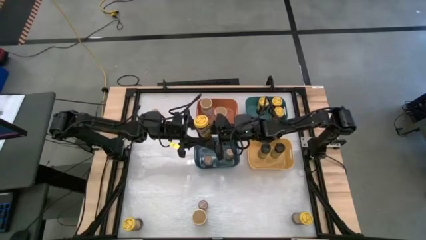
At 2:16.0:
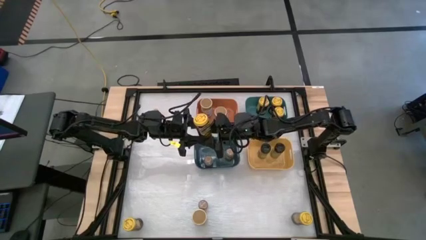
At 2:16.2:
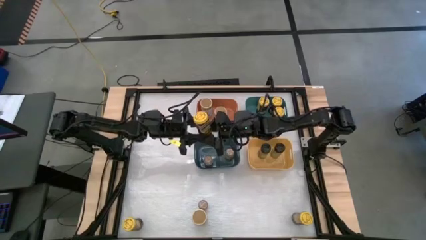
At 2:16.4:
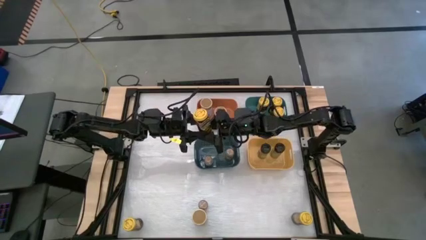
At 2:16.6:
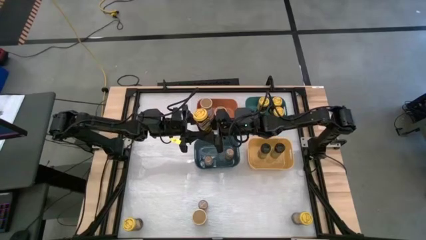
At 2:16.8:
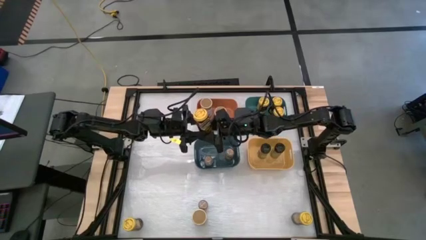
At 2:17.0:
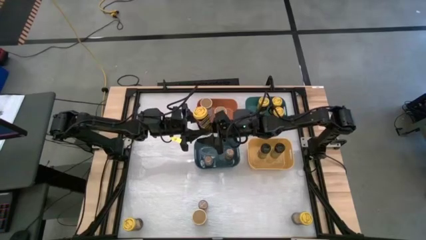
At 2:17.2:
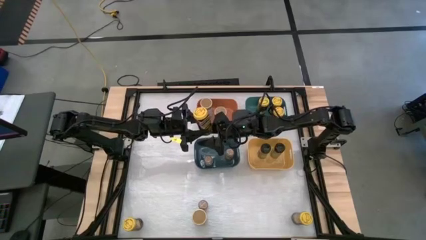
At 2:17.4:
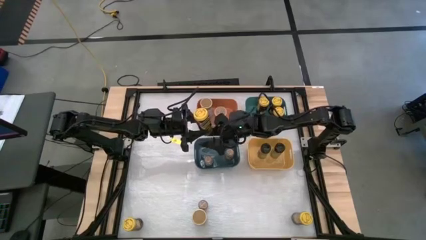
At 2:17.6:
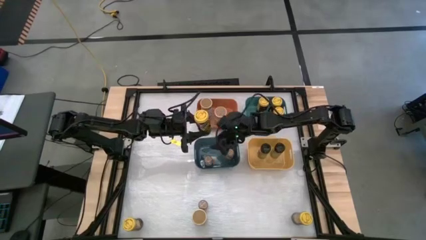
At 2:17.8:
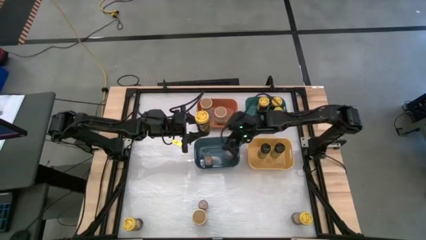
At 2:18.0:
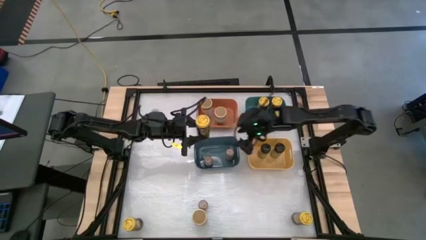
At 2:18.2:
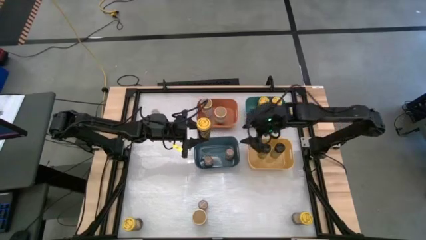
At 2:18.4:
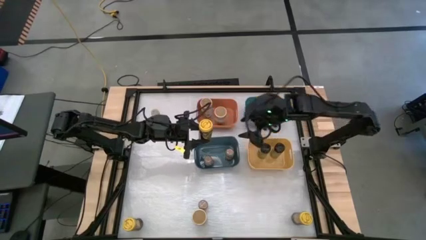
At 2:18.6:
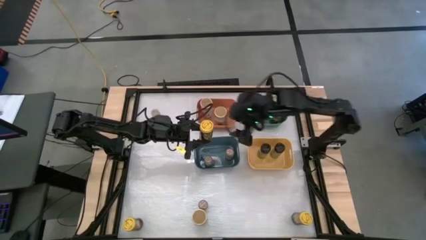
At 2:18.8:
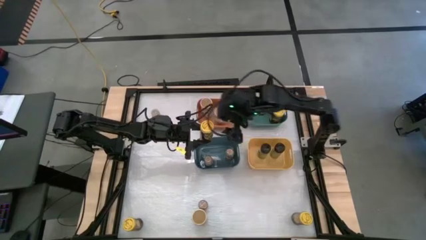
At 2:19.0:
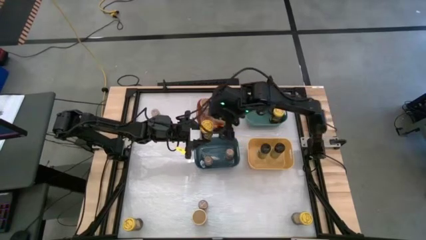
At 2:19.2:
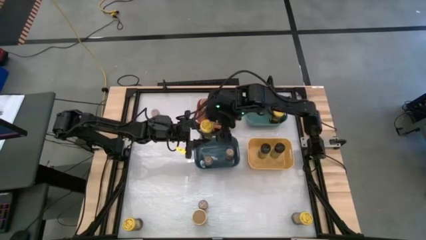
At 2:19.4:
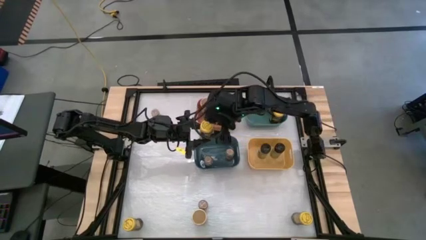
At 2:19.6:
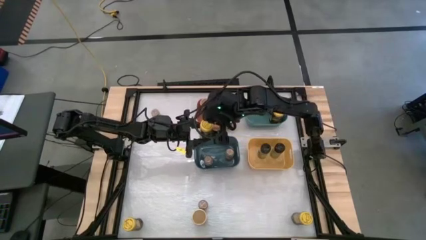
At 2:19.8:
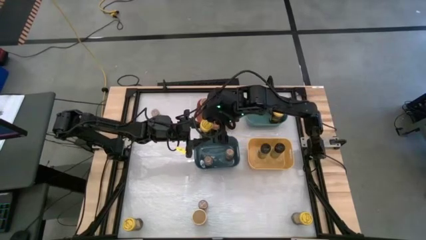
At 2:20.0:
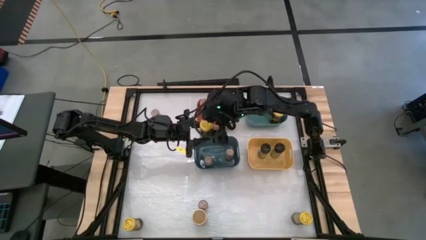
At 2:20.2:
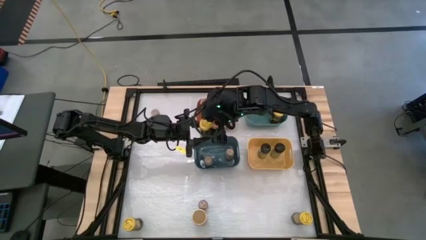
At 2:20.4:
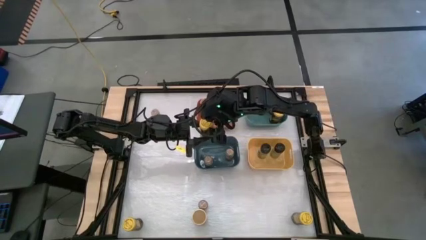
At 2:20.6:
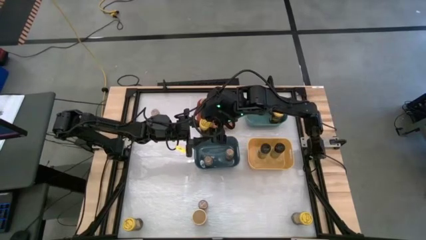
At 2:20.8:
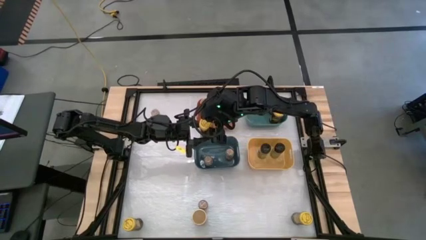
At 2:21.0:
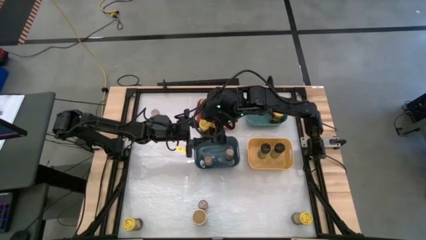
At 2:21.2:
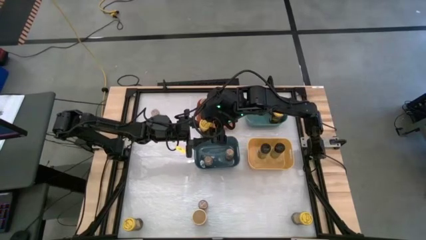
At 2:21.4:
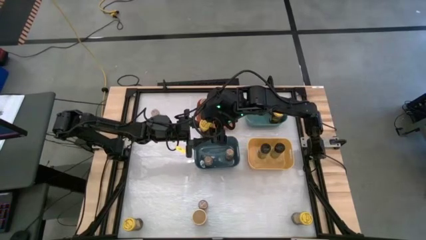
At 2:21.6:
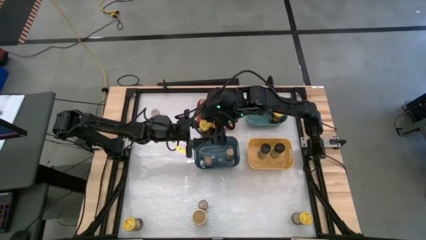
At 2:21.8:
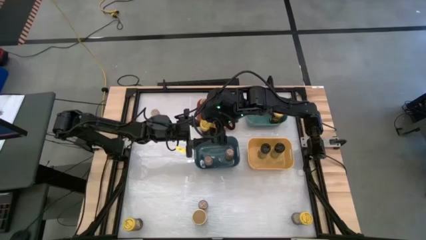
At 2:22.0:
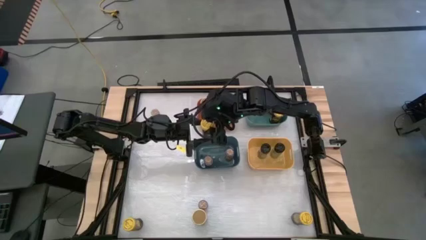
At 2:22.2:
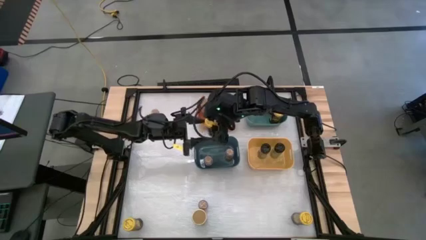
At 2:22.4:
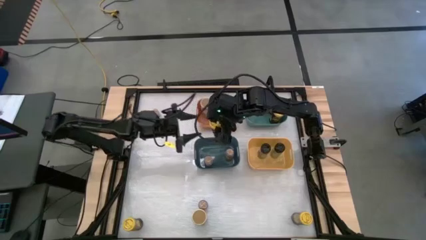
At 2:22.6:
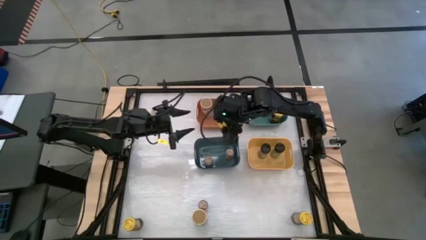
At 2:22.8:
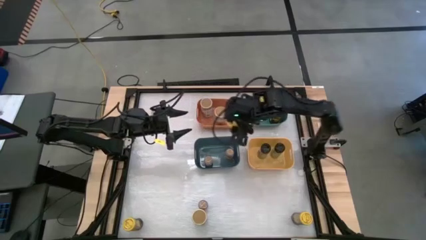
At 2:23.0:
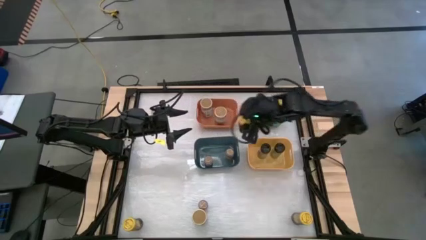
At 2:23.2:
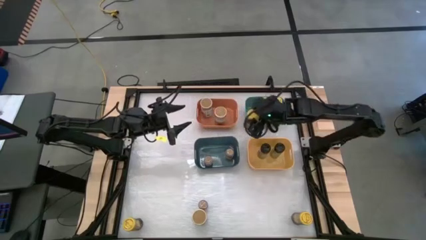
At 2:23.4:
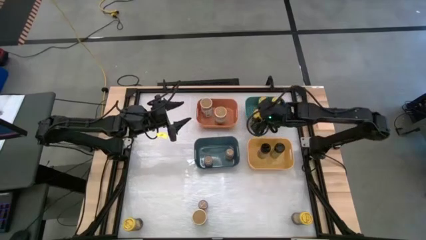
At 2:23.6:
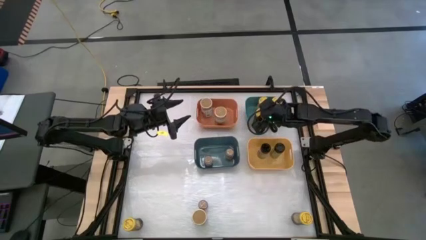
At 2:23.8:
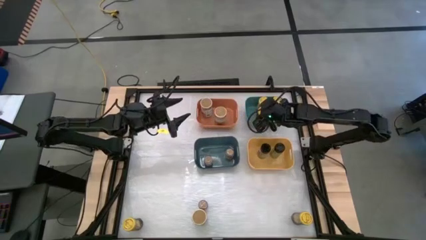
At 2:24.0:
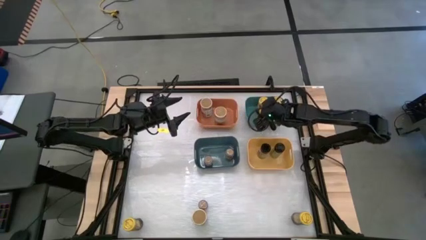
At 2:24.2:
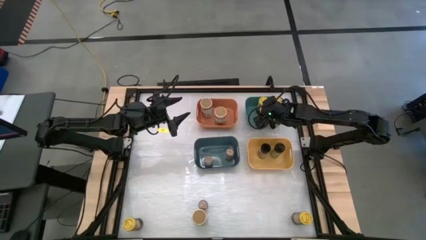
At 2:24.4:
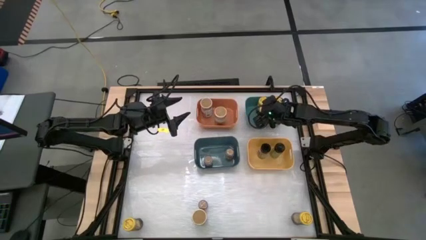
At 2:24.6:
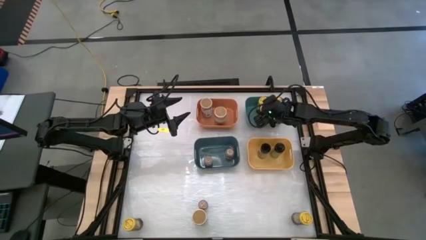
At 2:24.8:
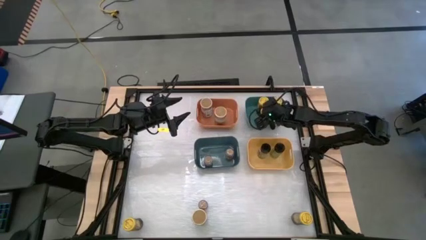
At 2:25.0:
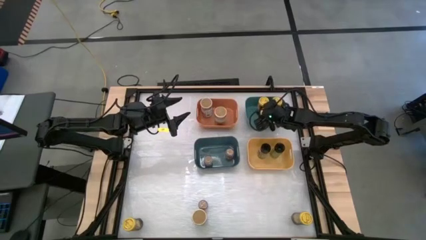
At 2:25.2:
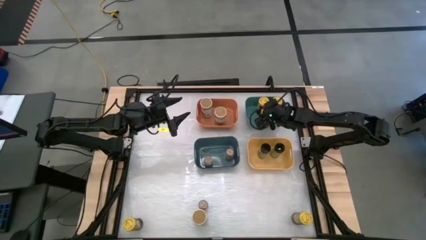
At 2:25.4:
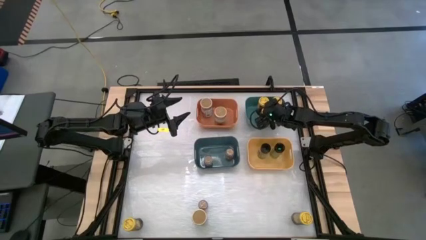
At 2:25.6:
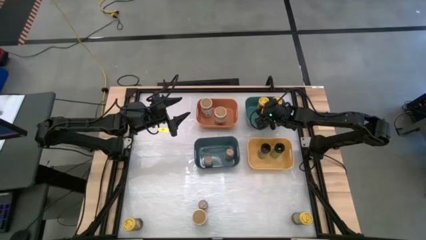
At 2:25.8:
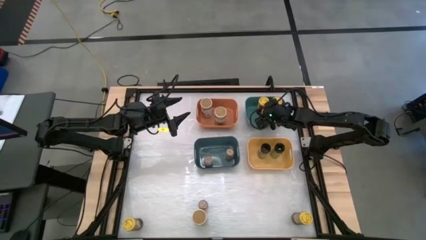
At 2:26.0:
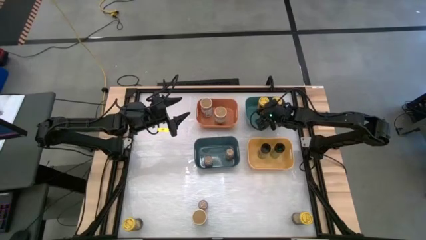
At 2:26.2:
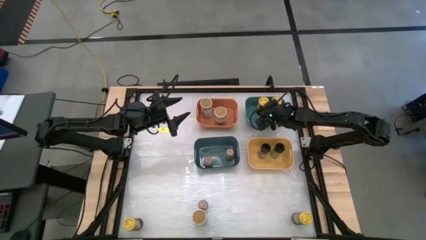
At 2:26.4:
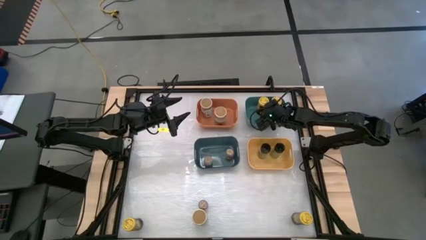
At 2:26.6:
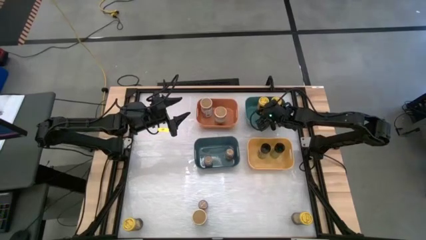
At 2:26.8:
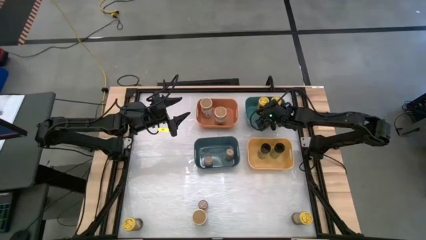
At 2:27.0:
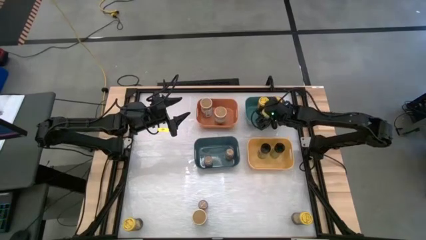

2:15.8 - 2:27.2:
Task: Sort spices by type
Put the yellow spice bottle into the green bin

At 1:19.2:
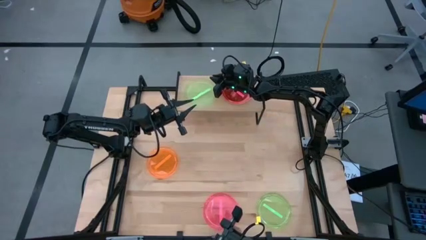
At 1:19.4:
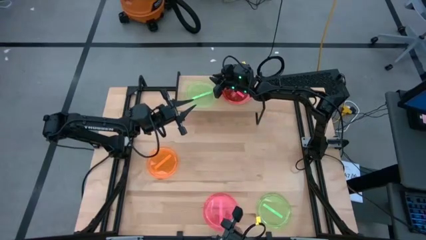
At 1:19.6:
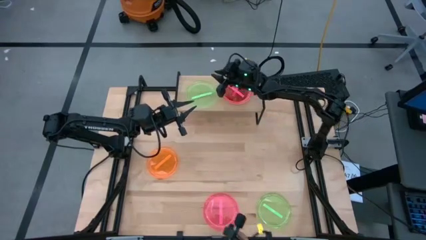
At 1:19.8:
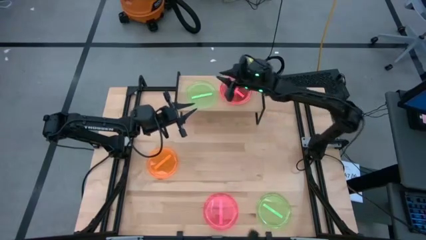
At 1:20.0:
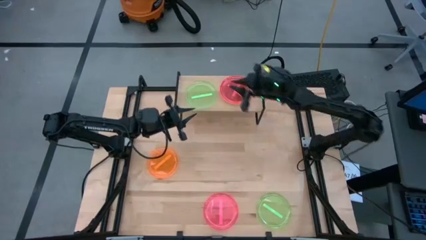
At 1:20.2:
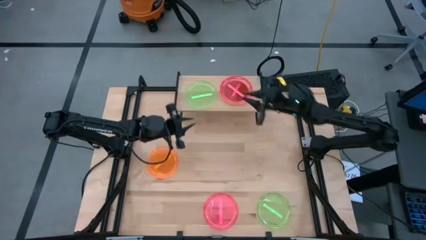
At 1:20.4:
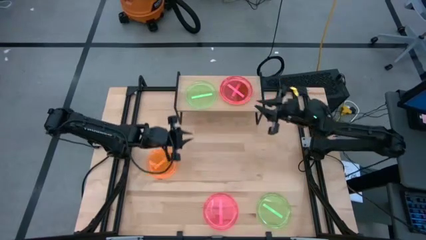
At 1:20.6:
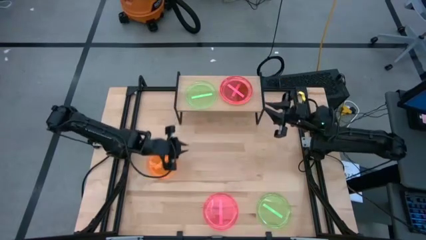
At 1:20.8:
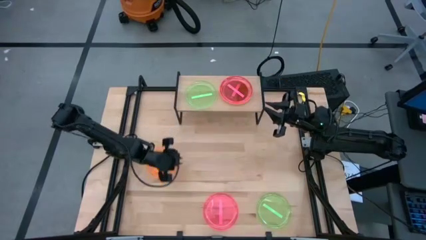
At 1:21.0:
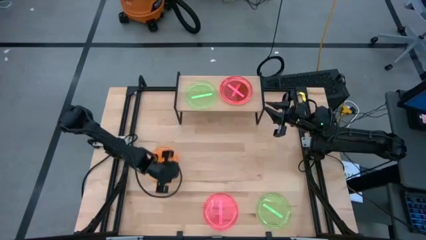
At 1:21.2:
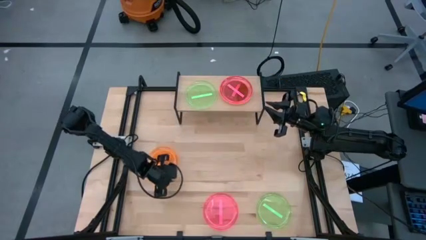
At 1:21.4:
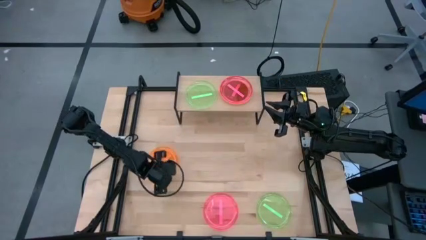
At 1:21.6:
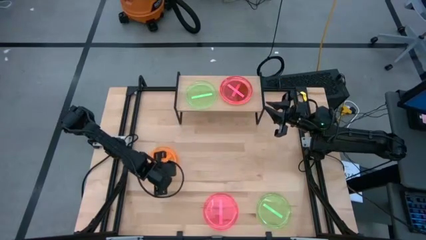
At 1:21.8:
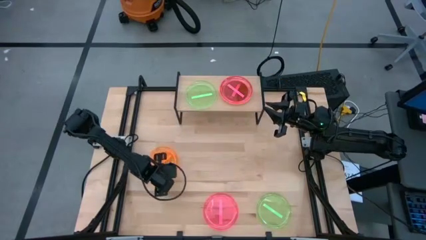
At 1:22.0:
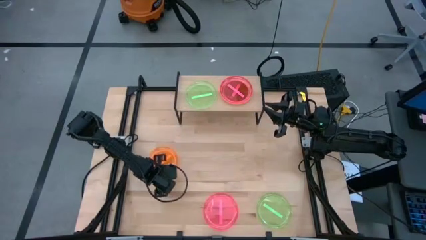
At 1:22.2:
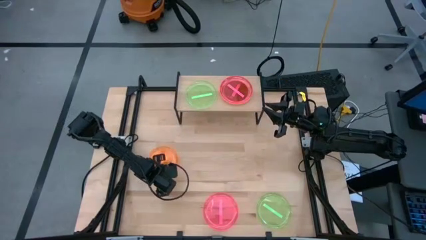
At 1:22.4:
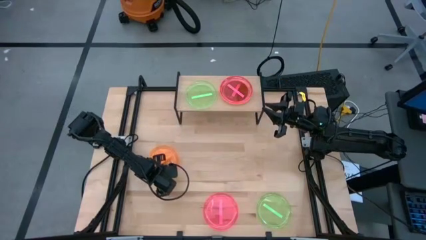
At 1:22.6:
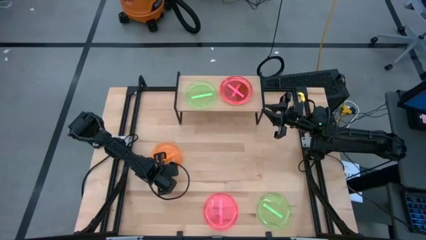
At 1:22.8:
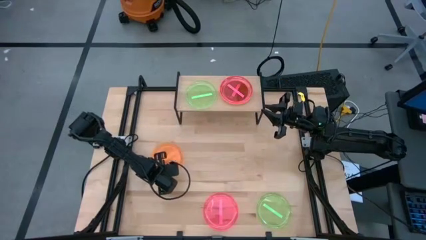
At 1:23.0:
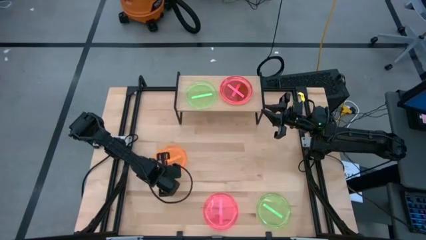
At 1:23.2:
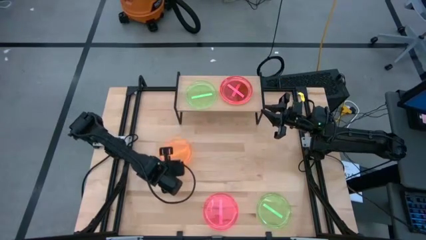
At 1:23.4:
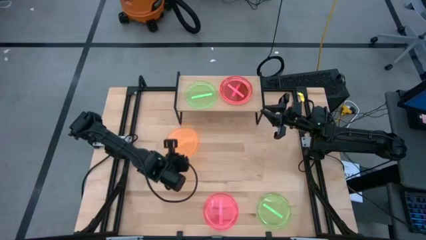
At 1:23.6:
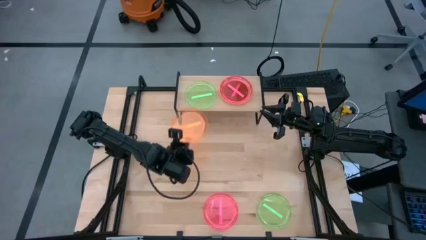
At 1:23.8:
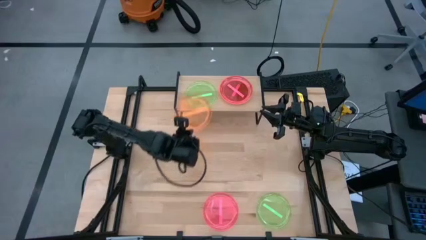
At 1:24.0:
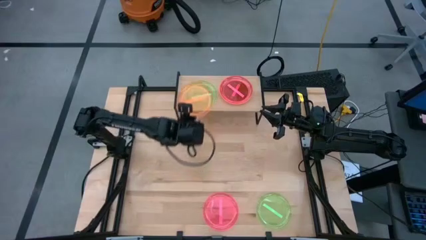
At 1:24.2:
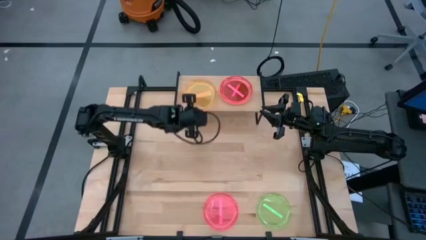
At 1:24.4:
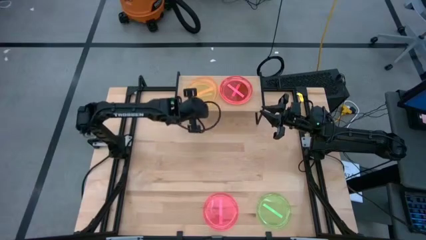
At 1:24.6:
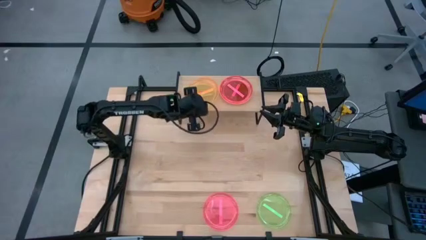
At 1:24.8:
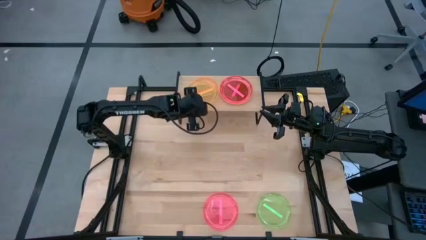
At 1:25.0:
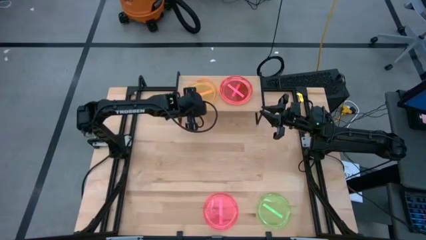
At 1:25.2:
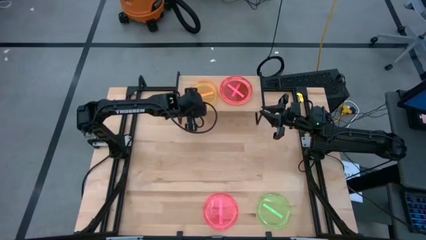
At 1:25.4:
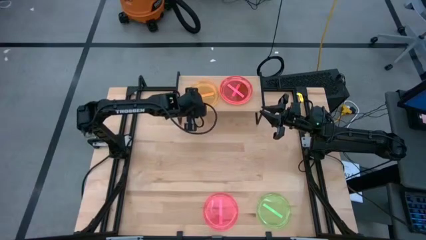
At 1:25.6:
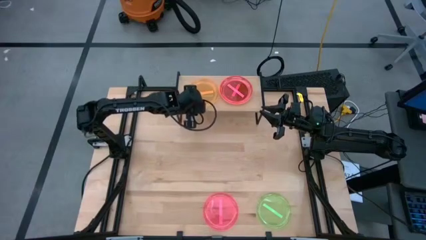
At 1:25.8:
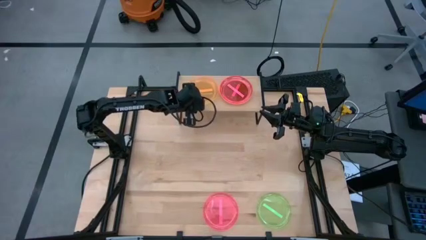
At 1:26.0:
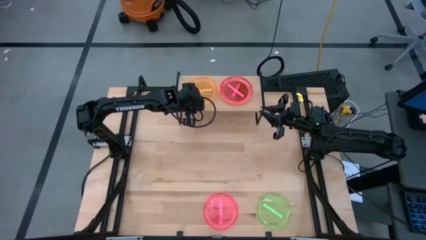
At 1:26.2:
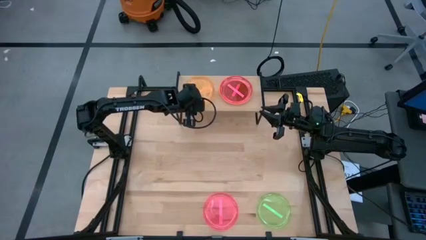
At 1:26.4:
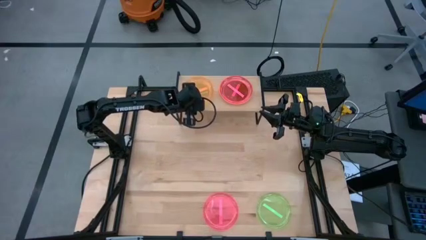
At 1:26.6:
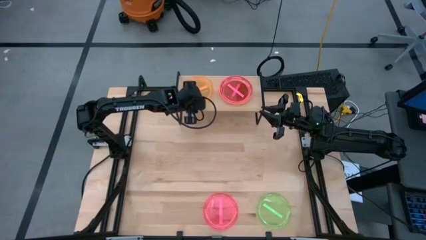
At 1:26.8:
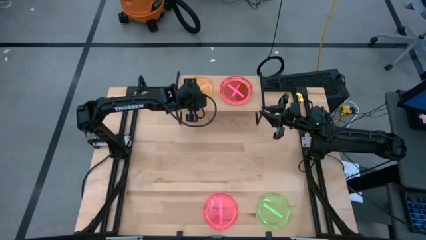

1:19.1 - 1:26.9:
Task: Place and stack plates onto a shelf
Stack the orange plate on top of the green plate on the shelf
